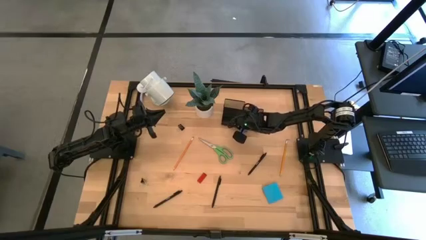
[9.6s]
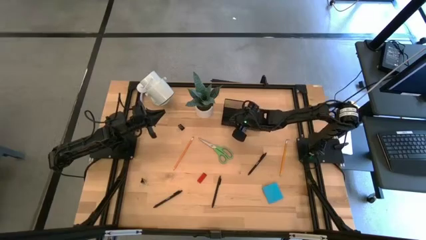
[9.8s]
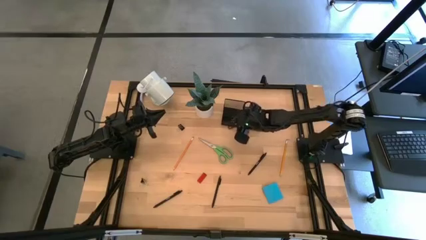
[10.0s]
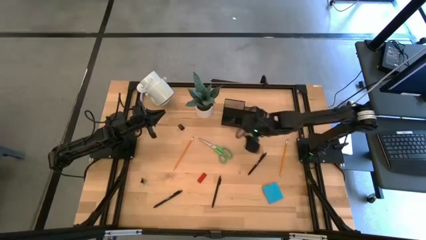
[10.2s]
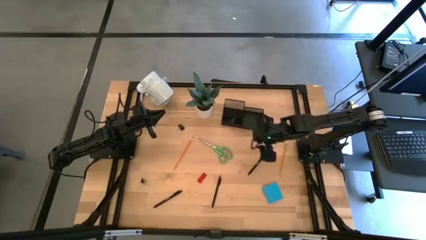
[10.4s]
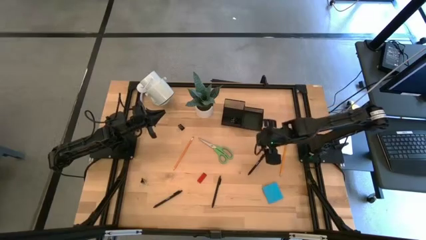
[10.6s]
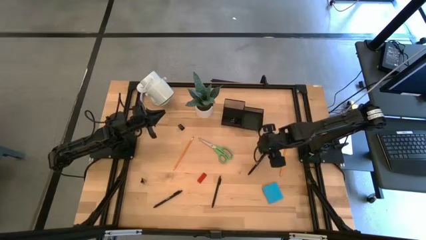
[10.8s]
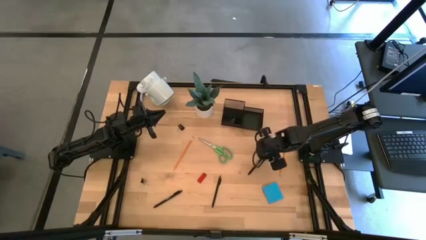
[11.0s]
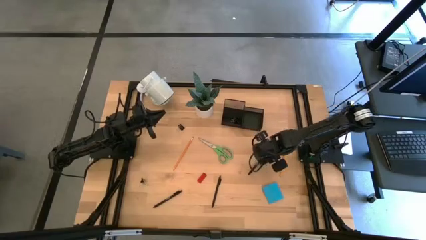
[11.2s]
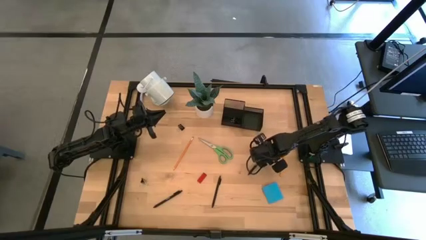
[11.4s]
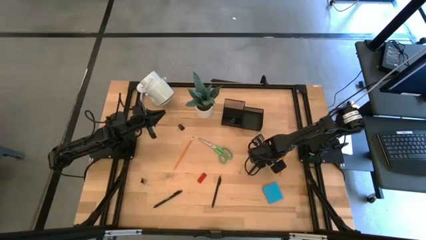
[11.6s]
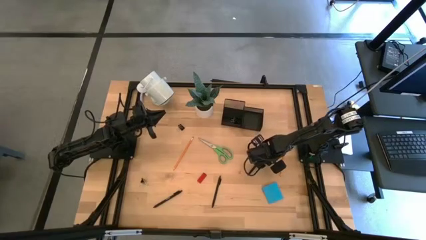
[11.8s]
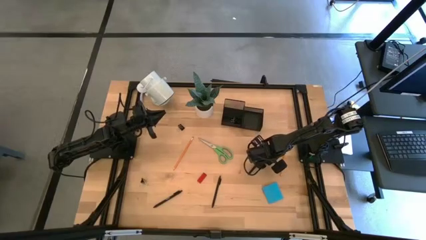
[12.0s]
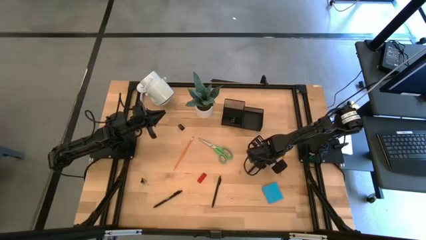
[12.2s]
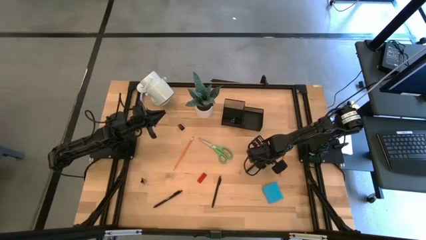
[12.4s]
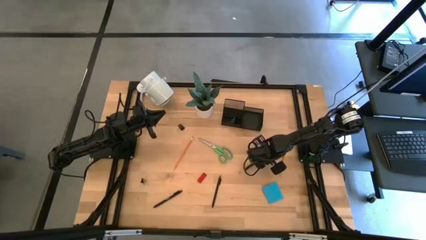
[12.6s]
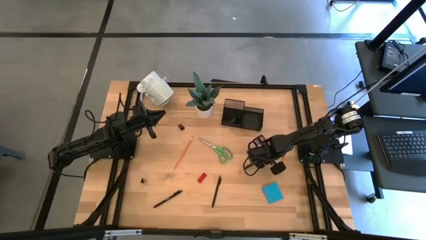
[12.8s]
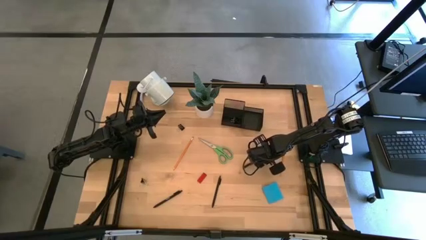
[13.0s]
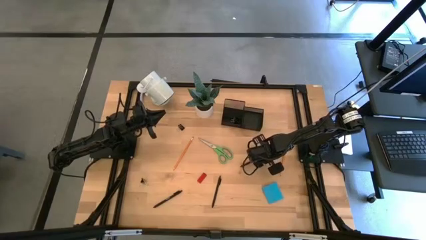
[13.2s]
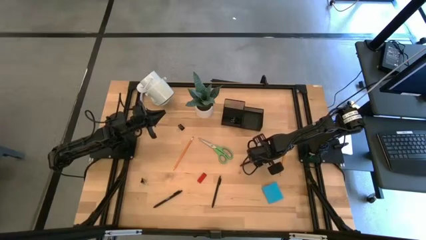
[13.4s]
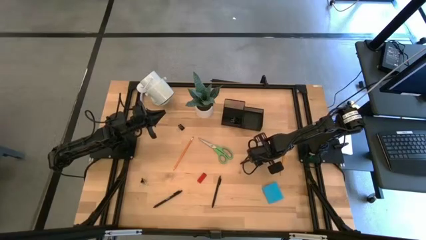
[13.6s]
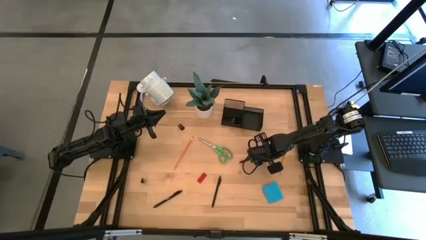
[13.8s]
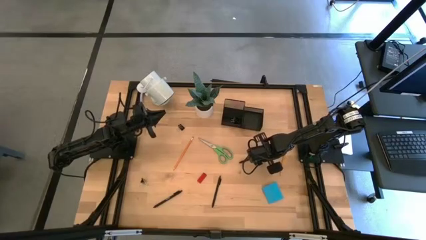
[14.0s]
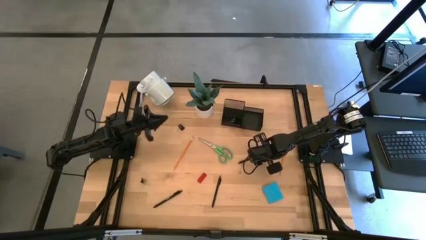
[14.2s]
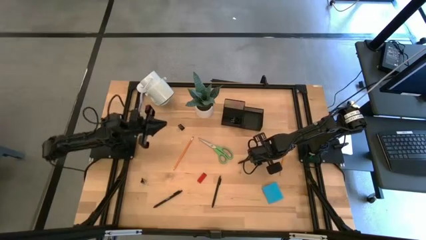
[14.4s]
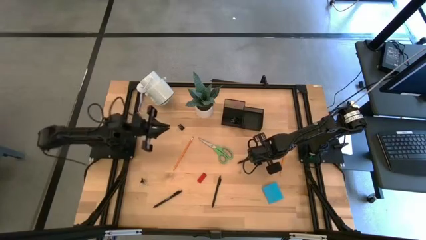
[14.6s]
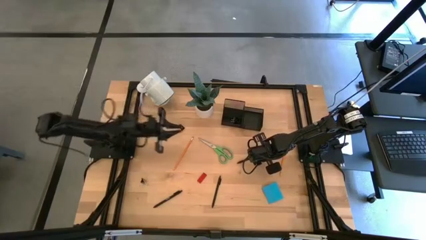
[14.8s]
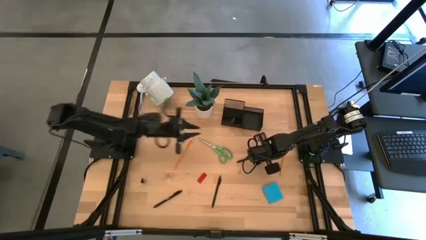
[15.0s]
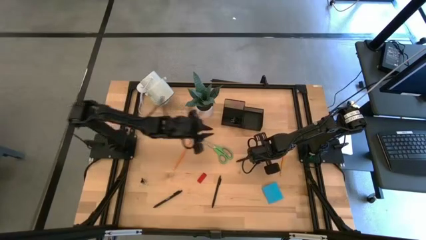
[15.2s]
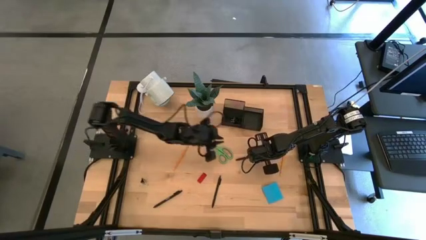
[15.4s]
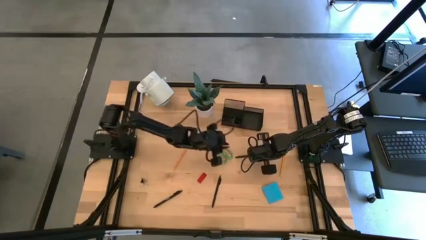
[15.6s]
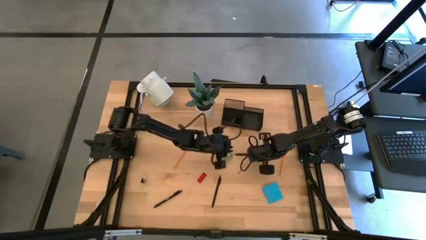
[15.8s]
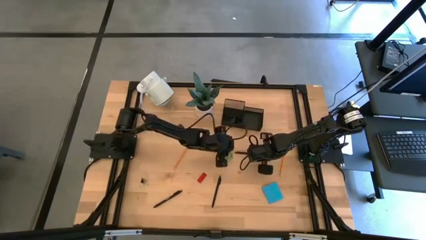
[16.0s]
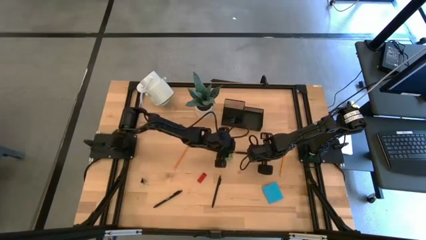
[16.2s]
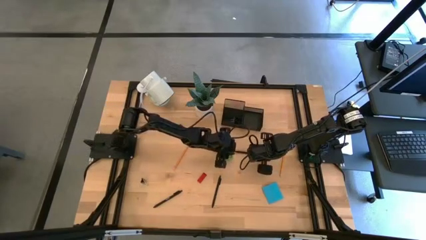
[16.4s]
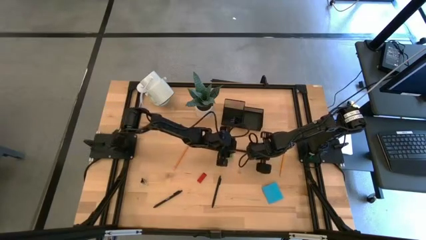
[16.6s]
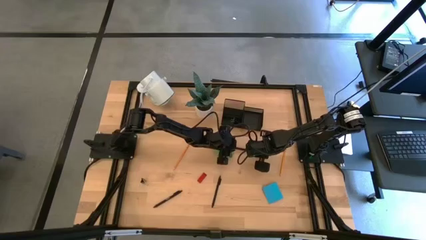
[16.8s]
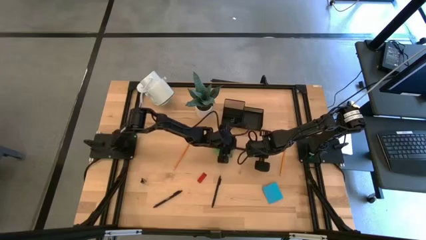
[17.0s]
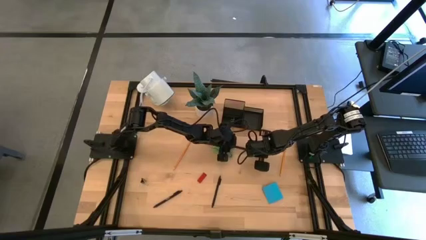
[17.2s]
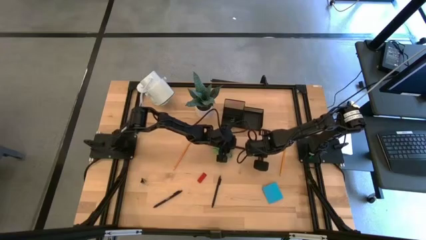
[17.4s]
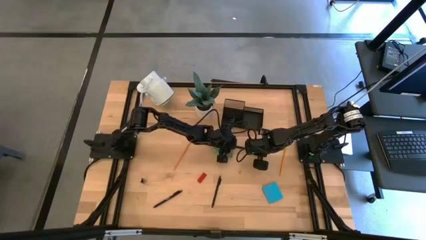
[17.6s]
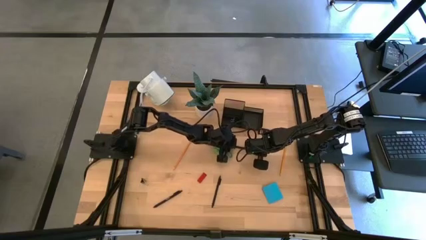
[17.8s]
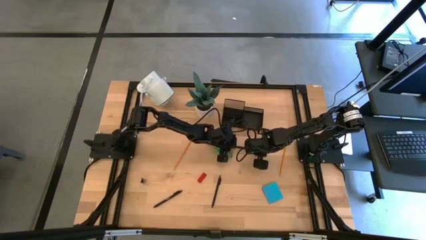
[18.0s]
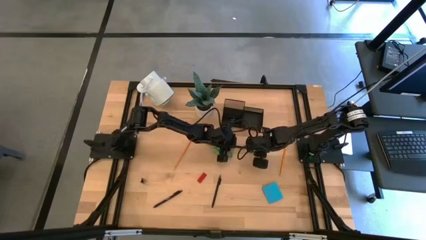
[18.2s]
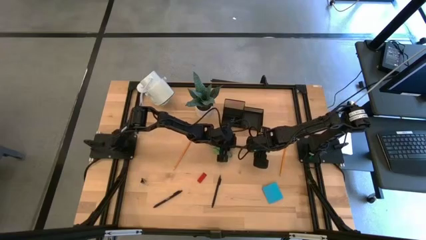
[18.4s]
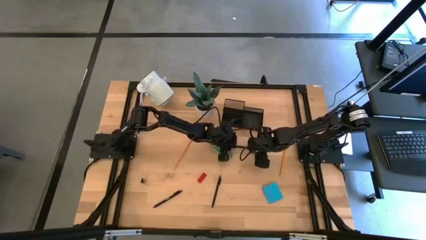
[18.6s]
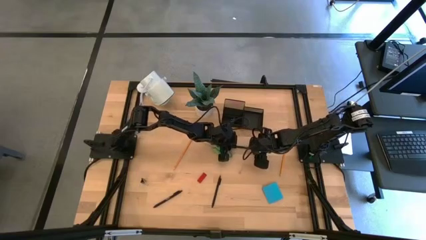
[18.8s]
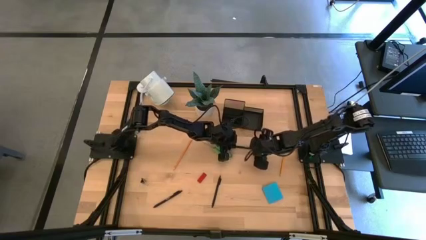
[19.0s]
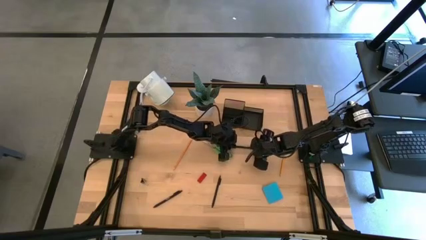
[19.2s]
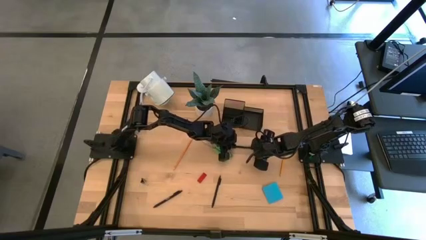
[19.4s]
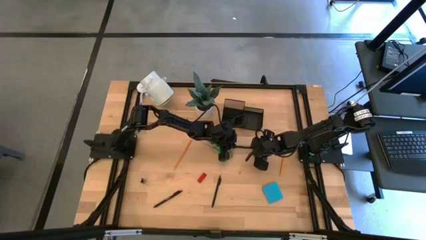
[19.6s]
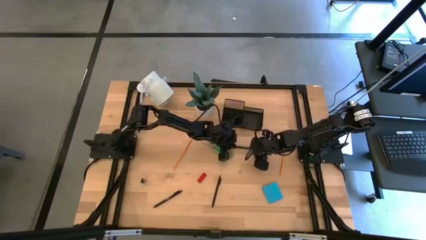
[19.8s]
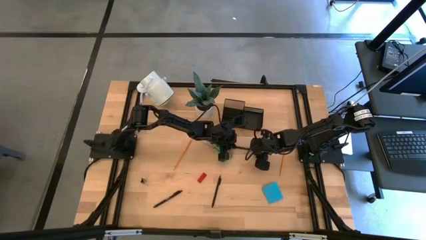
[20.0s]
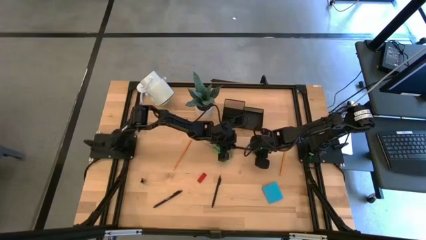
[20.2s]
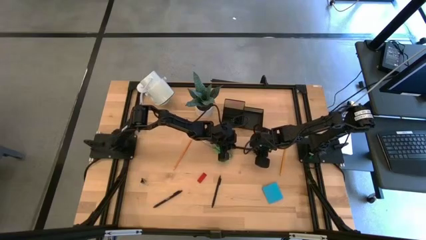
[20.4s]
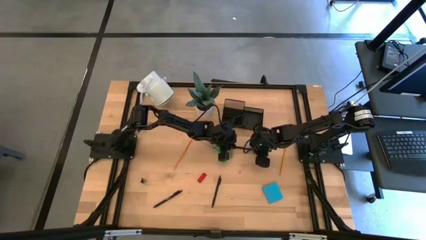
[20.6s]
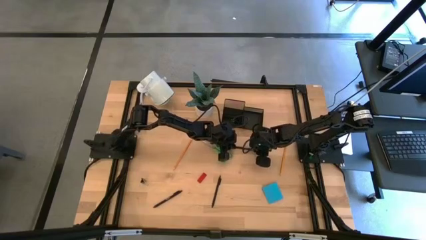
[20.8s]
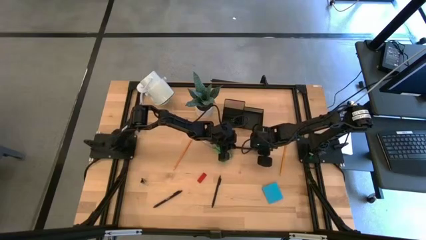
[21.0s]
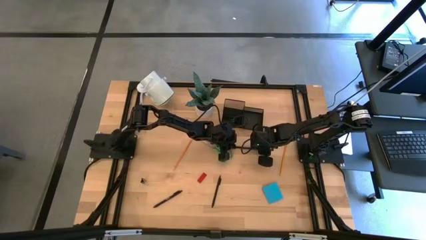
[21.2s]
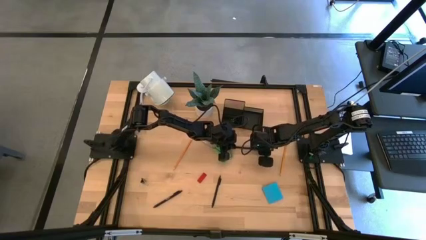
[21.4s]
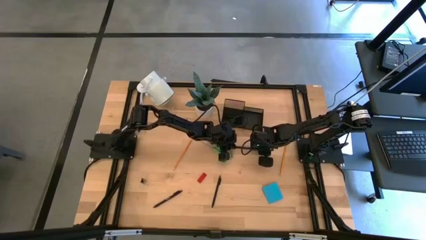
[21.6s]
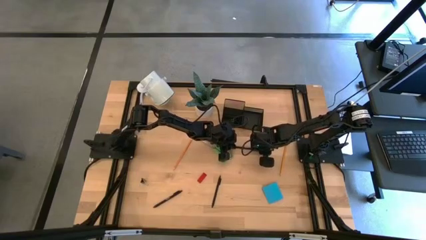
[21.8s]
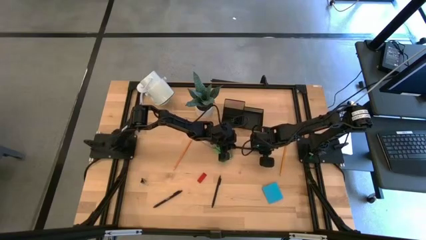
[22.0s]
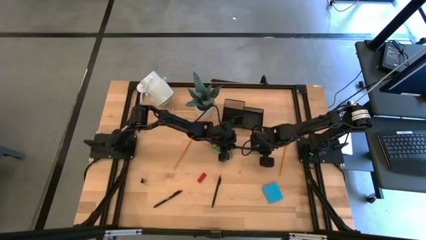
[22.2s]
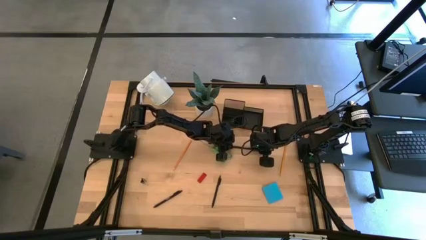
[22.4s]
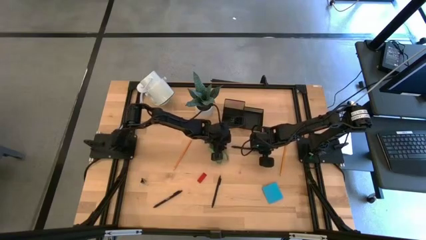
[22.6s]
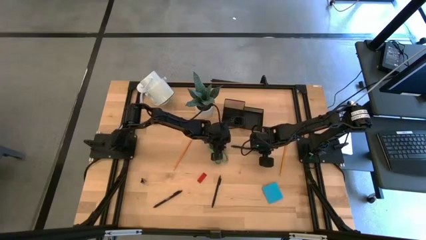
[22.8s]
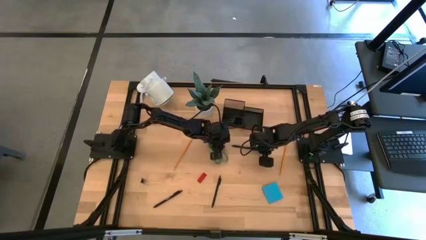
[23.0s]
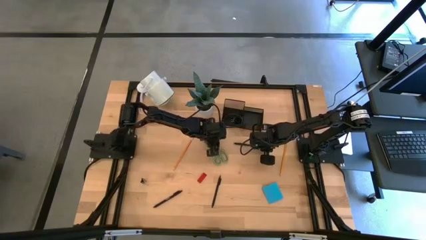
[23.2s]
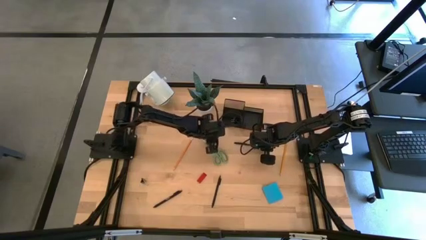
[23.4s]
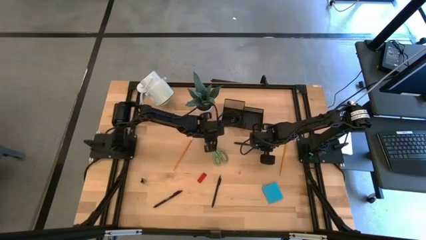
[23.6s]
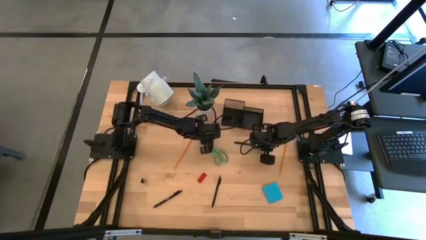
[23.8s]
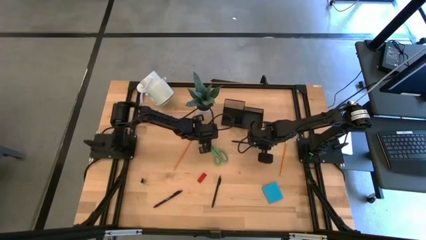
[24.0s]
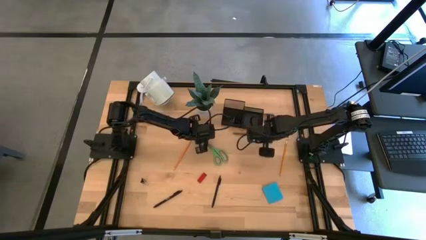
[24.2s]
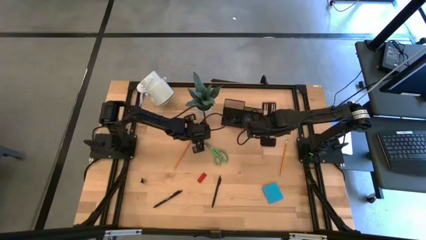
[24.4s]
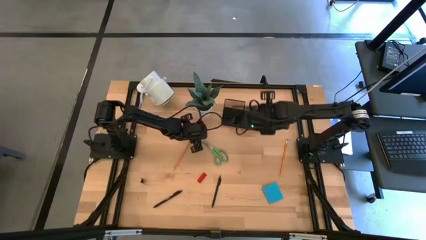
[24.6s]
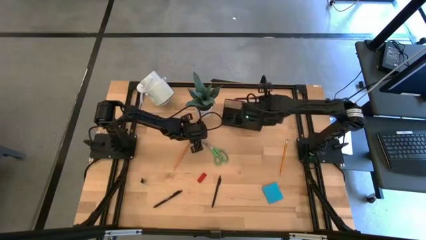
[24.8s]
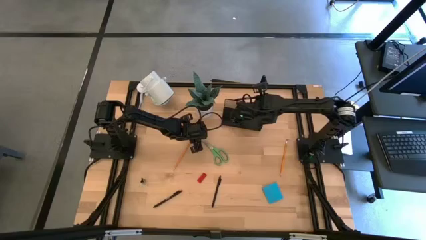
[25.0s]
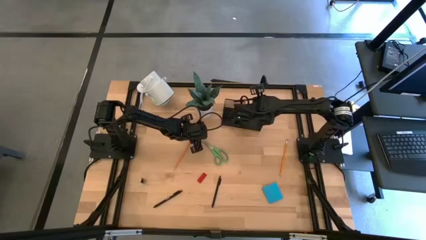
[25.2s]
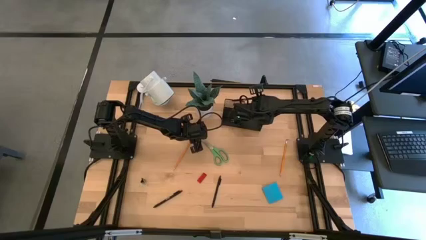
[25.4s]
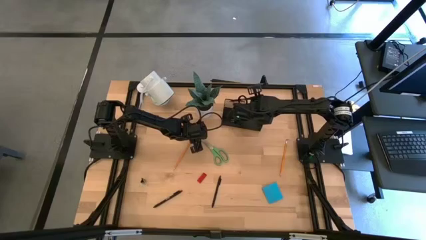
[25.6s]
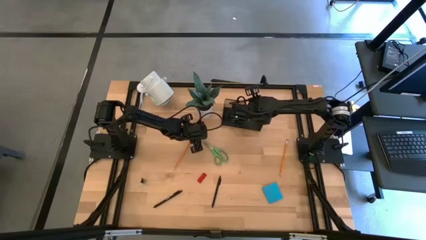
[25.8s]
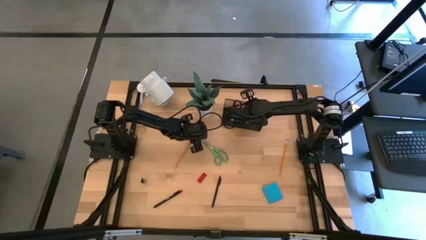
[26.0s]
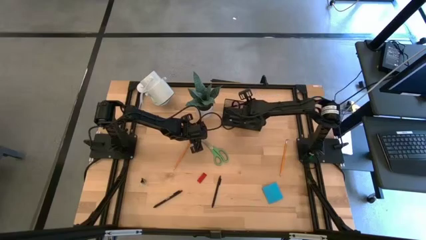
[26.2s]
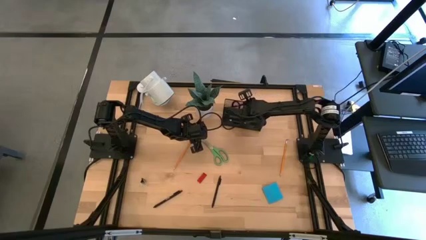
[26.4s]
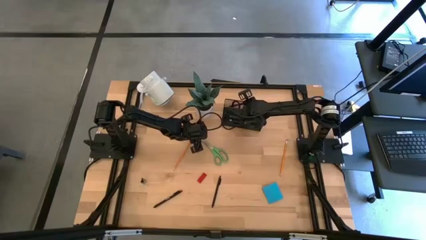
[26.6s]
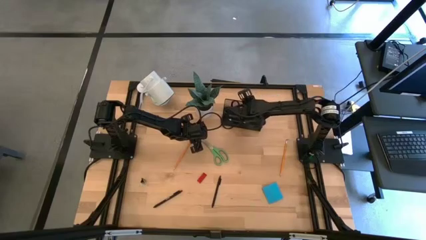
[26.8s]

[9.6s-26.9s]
Task: Pick and place office supplies into organizer
Put the top black pen into the desk organizer
